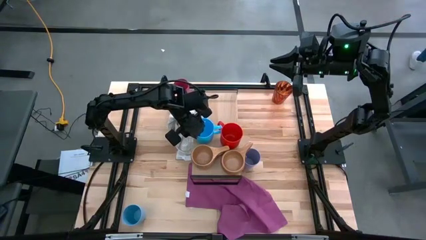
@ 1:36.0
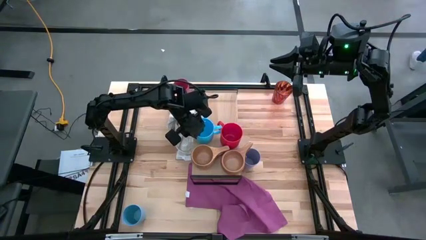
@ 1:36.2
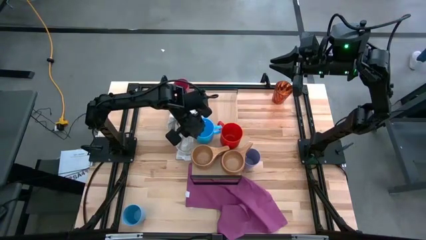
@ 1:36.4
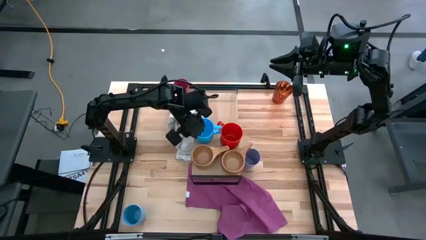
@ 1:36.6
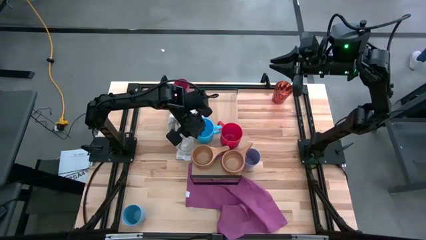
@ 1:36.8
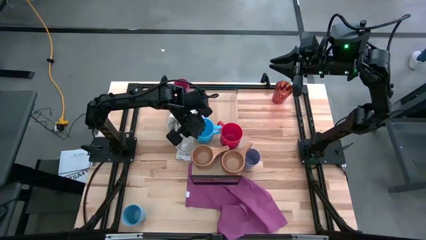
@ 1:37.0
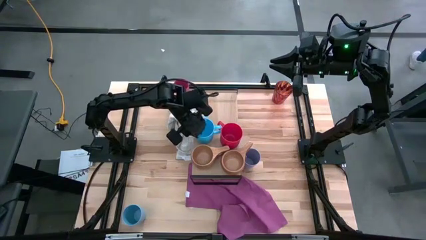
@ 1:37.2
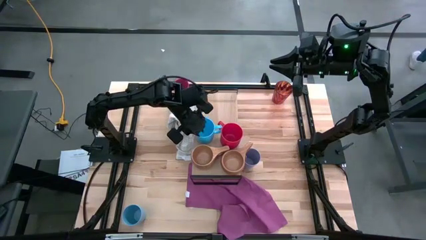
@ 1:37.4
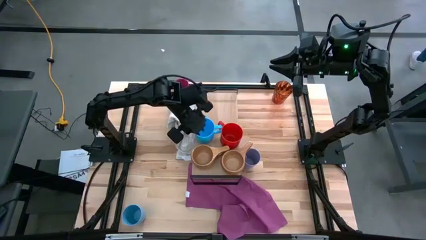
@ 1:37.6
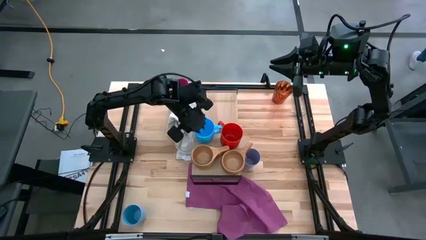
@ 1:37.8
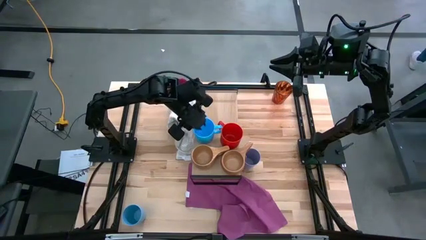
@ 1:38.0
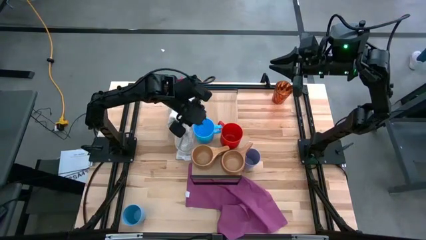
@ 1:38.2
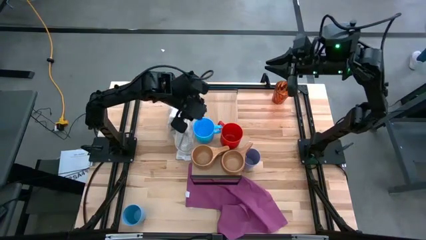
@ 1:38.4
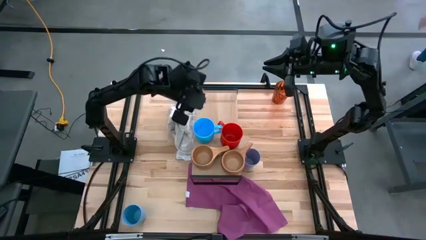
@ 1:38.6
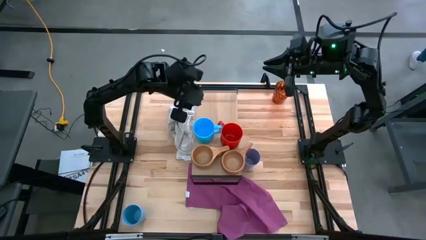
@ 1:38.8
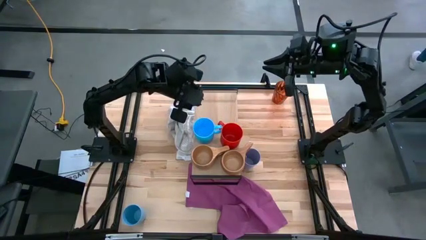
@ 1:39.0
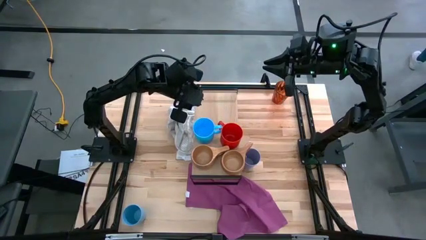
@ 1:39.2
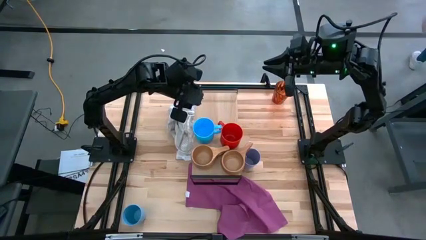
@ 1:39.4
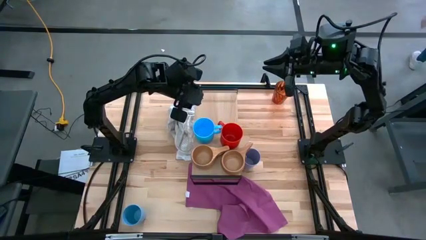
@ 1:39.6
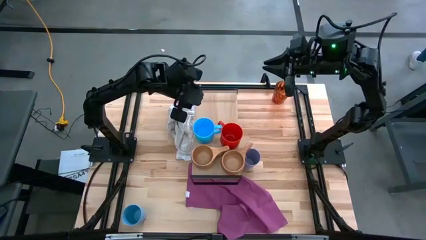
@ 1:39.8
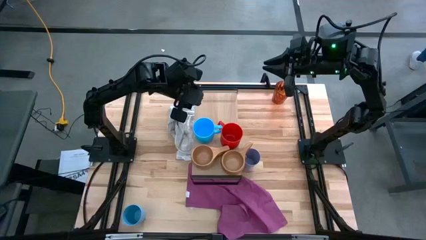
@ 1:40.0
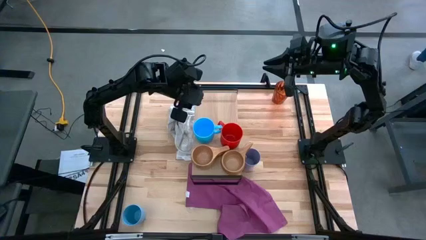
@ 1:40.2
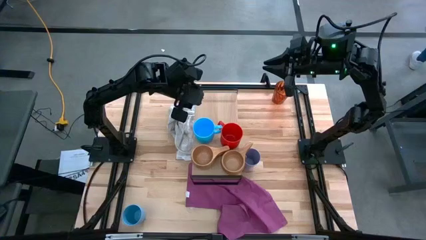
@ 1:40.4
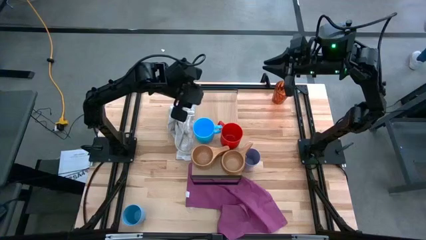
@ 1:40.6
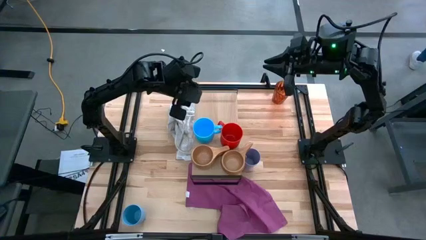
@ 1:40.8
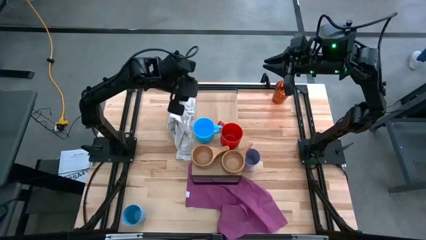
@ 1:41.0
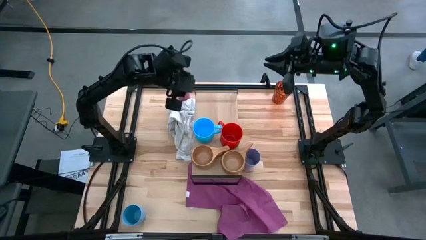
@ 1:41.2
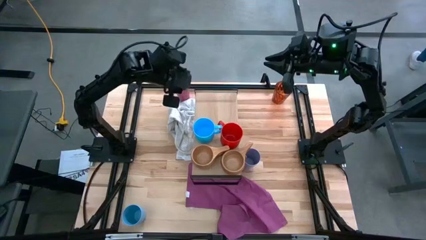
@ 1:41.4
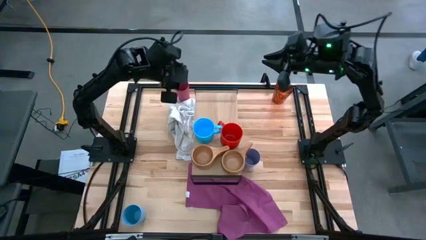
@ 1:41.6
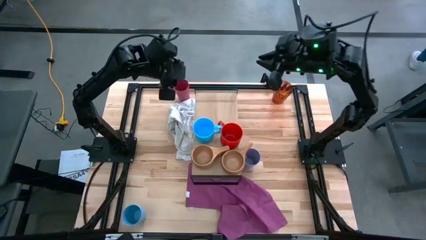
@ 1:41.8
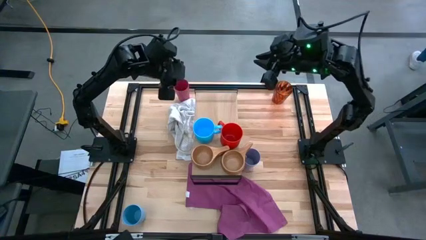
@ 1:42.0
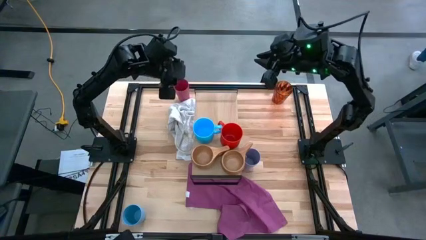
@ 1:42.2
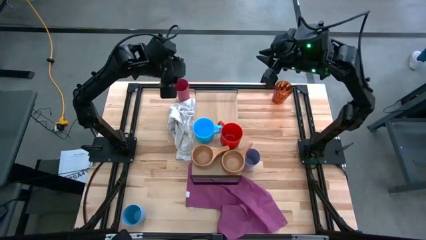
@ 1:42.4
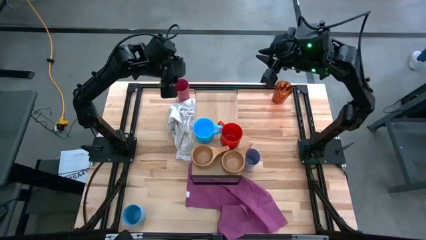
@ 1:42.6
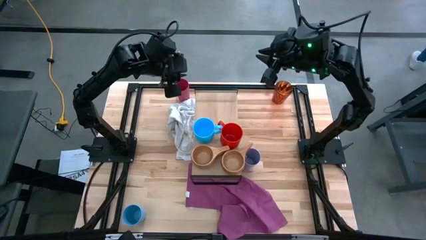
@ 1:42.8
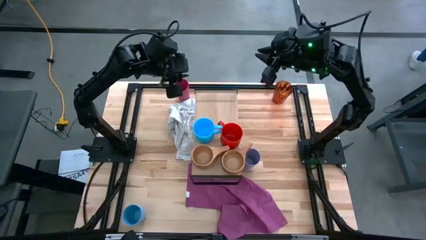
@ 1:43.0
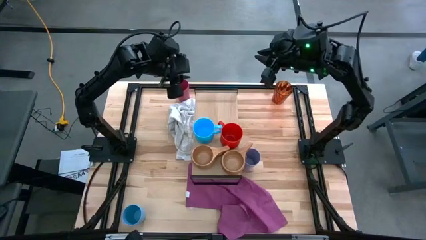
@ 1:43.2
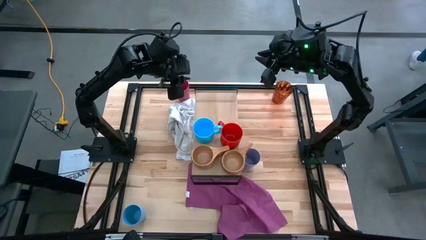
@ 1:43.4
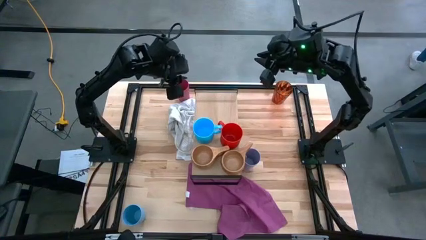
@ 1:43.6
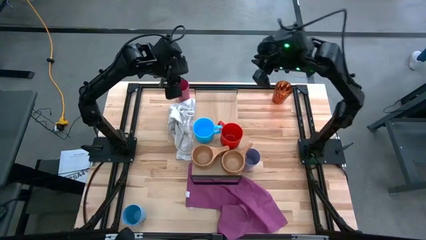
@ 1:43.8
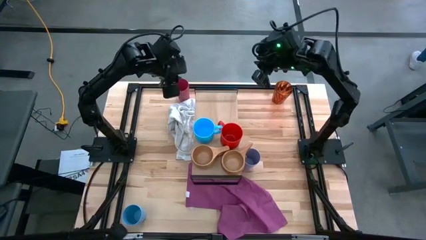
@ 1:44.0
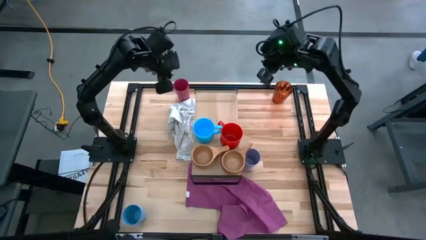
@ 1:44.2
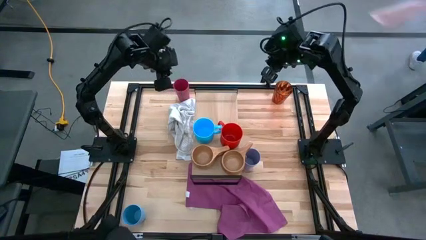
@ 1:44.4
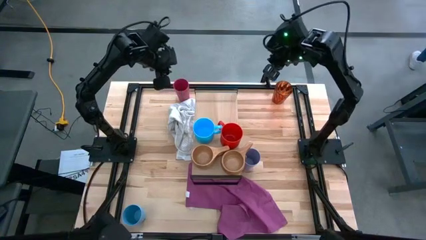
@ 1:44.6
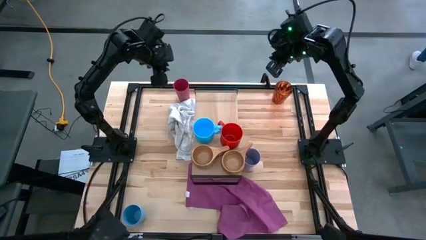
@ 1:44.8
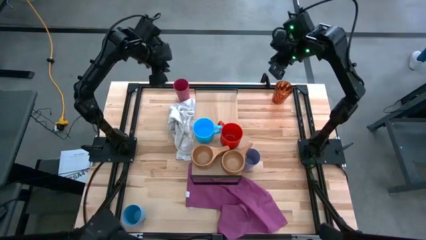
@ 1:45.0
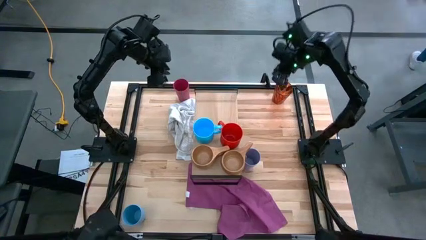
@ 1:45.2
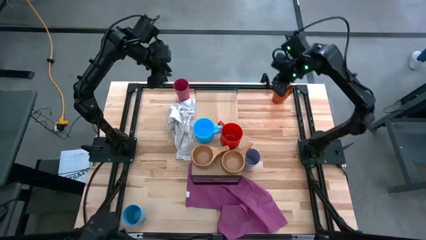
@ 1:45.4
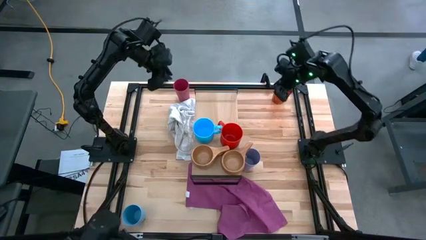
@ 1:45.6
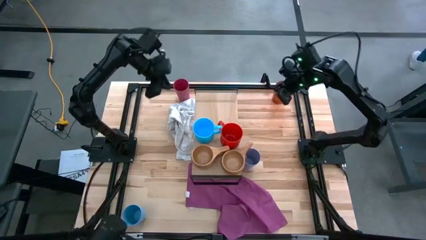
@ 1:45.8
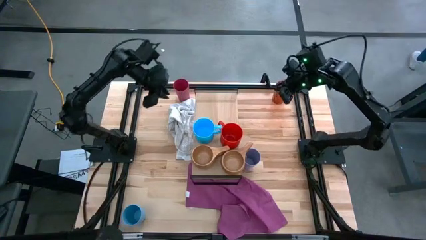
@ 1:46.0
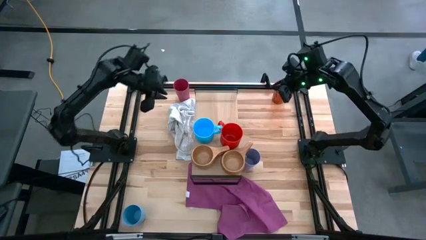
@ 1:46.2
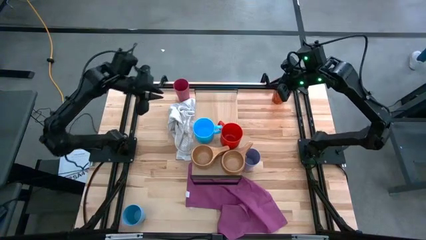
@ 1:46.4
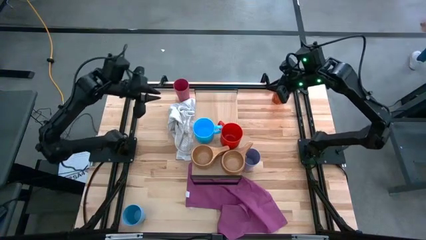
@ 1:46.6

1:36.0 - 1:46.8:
Task: Stack small to large cups/mugs on shelf
Put the orange glass on the shelf
